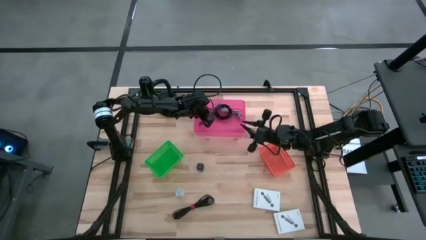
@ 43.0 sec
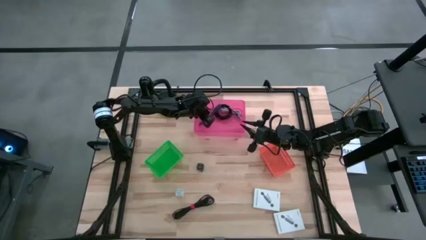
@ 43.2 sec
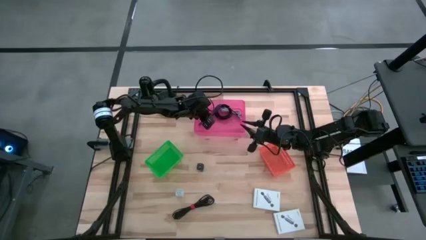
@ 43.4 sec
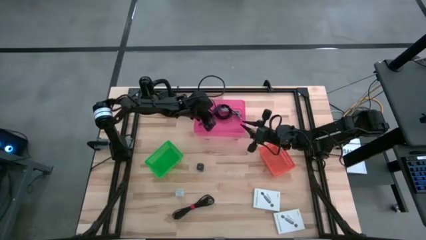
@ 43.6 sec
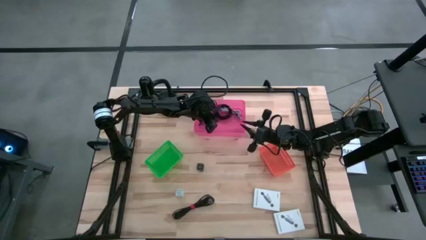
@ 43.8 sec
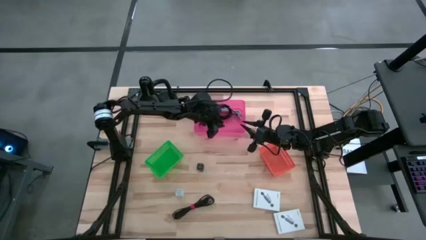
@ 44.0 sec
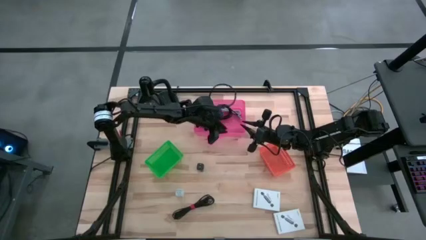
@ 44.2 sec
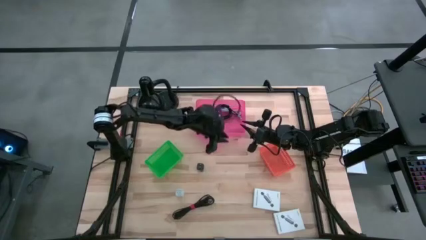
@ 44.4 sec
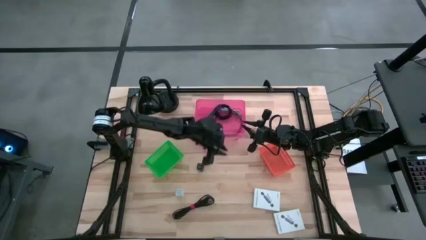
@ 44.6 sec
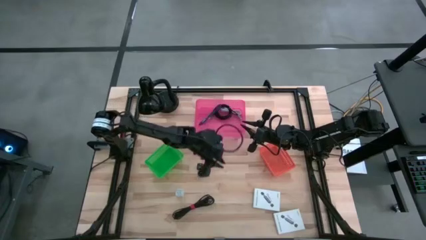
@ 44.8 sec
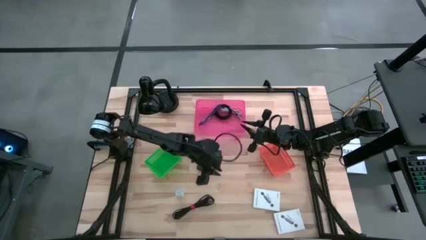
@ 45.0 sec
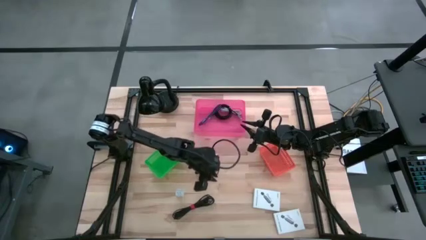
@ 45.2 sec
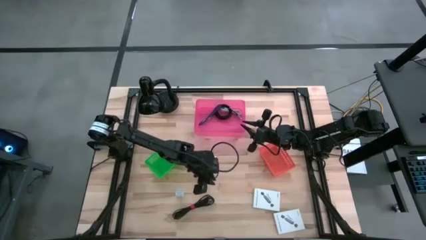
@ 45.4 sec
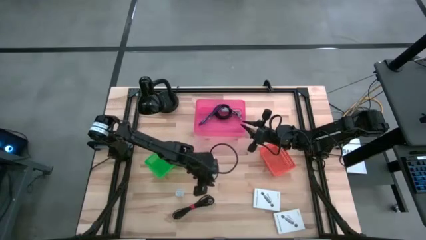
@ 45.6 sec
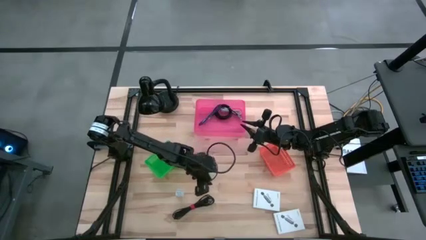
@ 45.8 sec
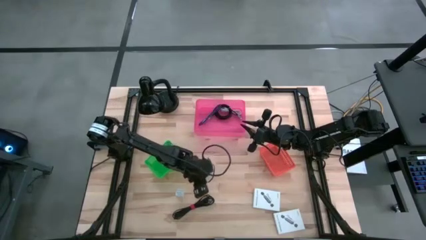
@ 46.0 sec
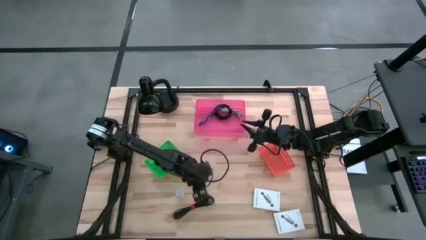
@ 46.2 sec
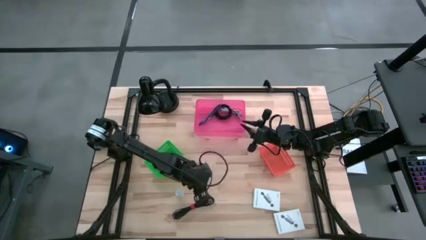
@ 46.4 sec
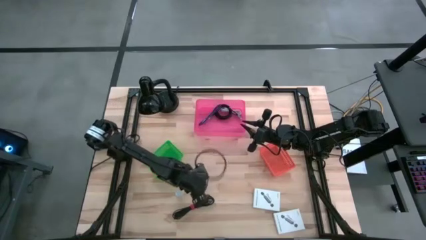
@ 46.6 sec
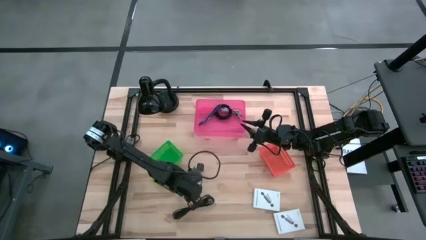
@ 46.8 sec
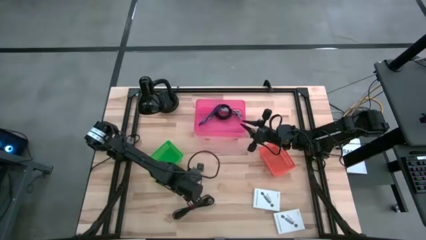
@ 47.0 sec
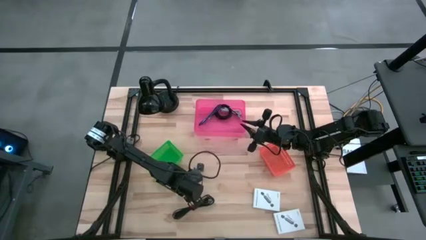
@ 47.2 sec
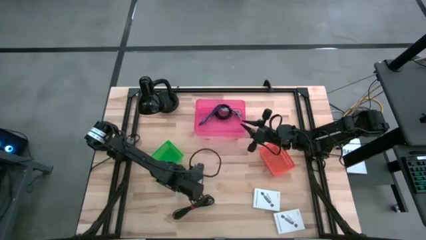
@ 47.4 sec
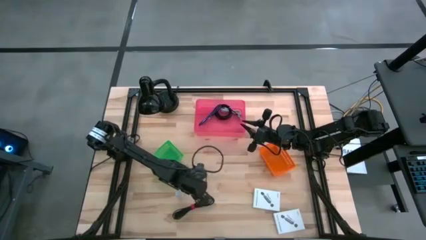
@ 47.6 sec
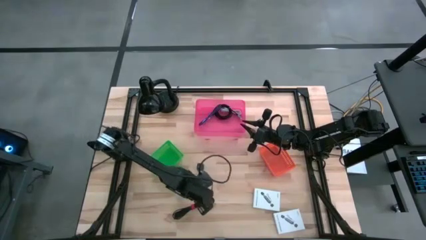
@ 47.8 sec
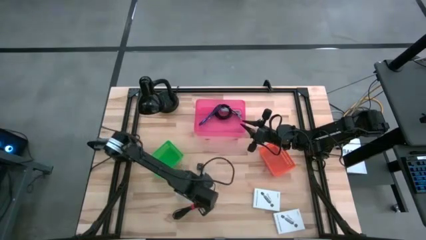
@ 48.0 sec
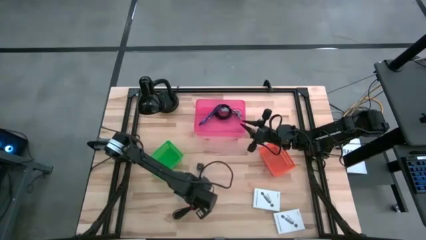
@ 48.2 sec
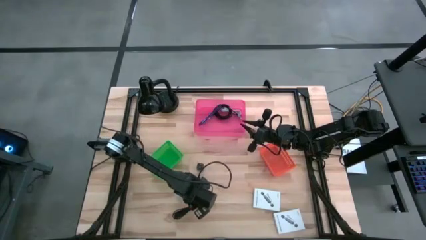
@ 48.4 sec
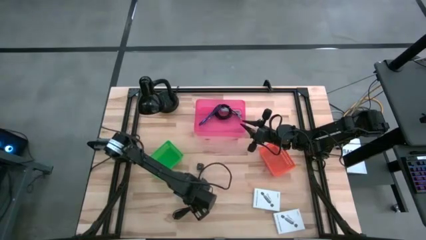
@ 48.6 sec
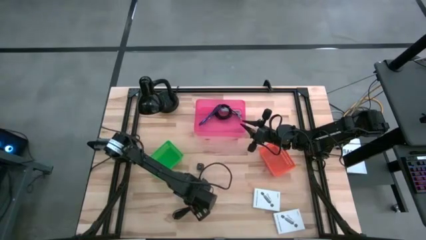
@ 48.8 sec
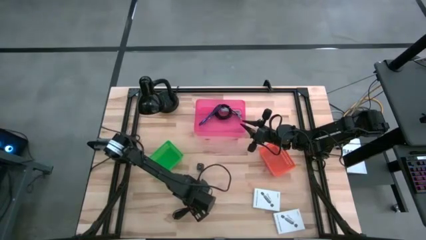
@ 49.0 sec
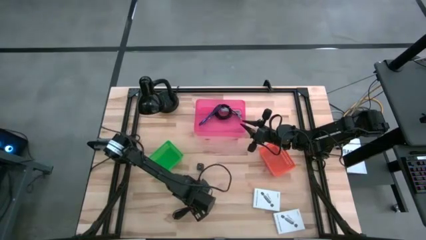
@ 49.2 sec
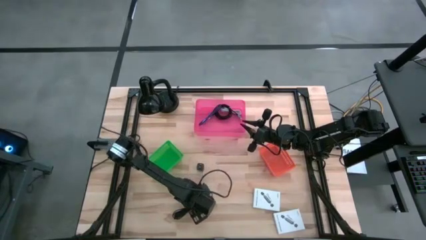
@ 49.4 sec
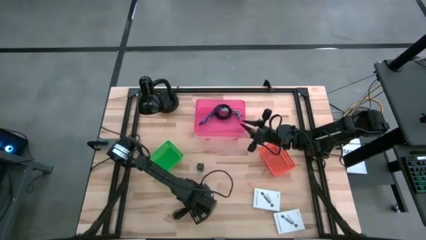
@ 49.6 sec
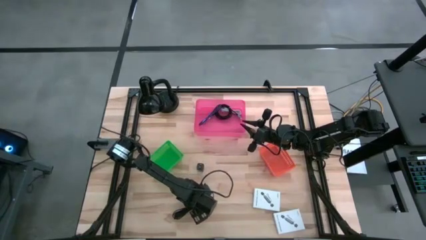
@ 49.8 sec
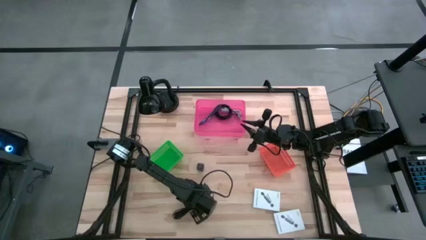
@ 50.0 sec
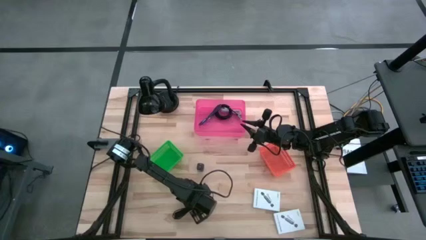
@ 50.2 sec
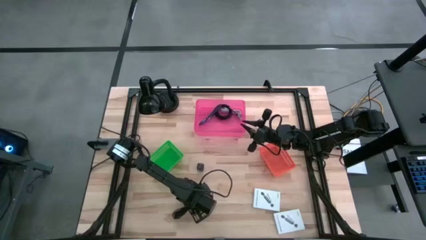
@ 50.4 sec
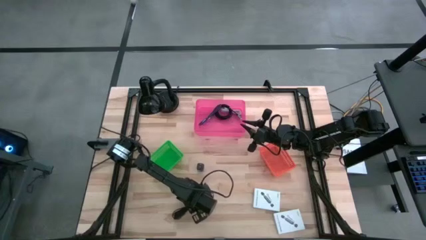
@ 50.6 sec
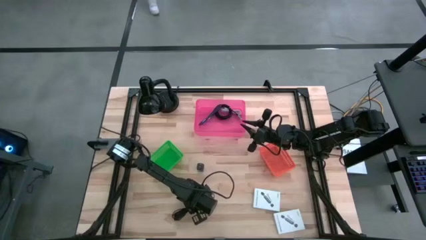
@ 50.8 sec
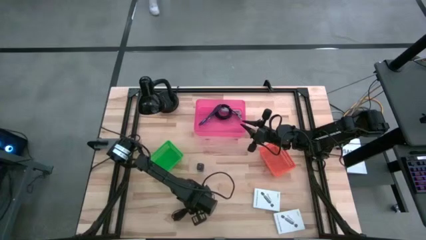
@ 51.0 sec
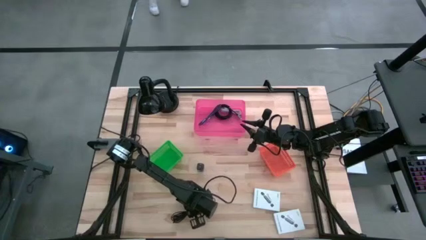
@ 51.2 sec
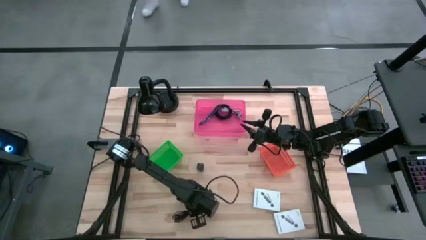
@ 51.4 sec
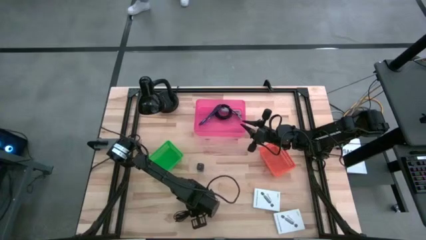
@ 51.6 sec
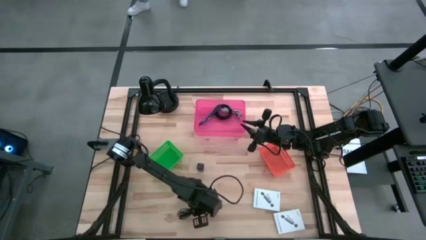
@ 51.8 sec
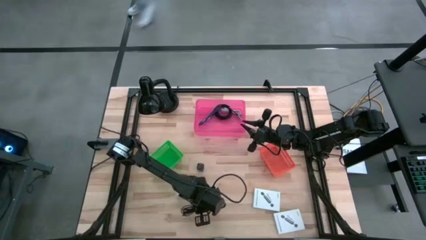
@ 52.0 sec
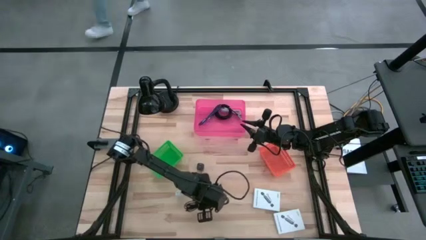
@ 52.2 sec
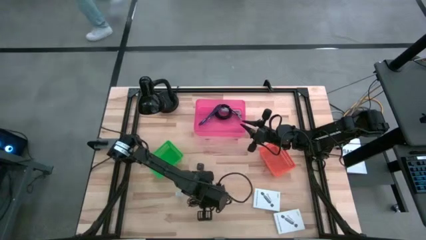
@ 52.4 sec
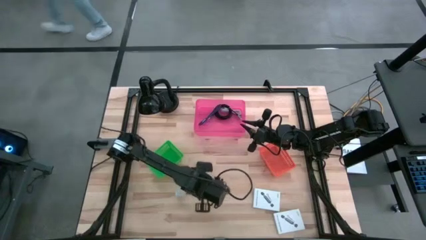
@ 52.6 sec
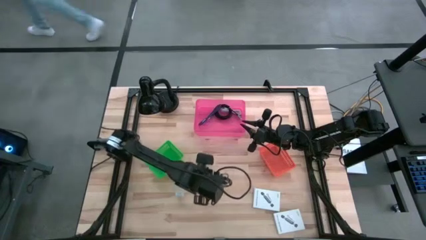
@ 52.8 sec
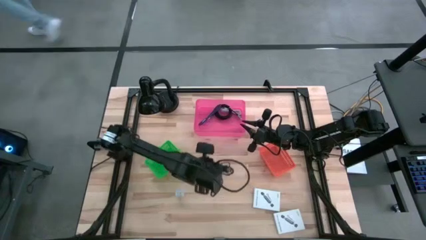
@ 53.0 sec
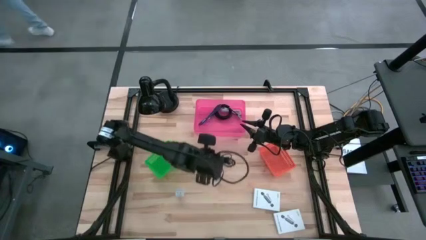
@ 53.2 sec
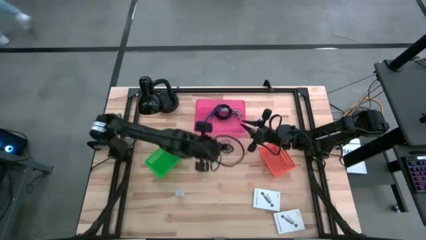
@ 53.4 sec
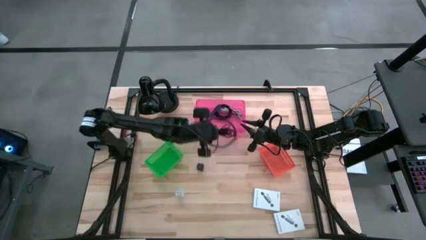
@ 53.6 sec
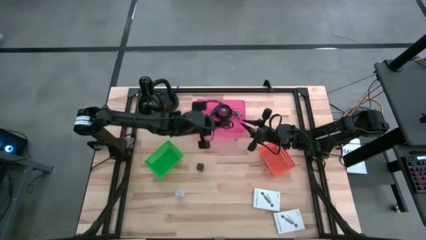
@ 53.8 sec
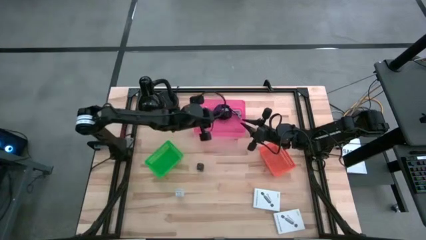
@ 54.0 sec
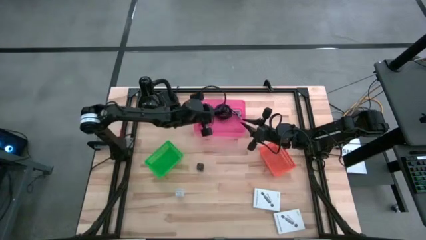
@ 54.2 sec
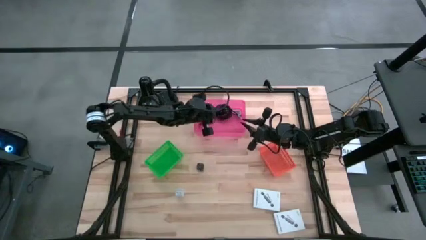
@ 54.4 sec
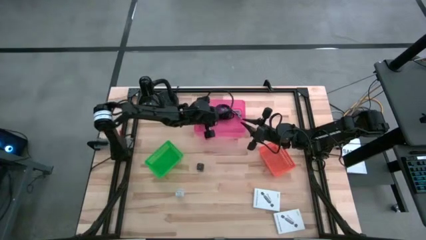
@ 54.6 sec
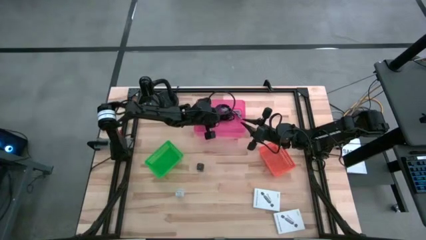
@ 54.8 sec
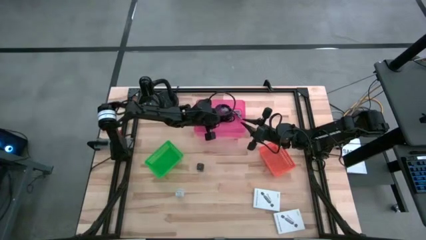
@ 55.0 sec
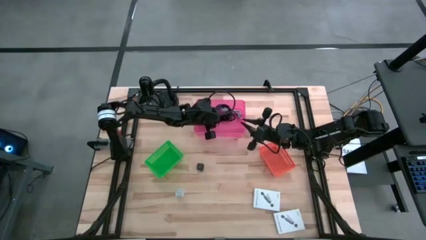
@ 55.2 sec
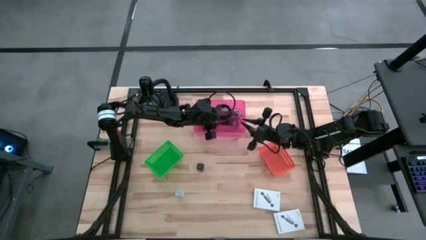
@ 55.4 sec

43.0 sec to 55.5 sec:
Task: Pick and place items into bin
Put the black charger cable into the pink bin
